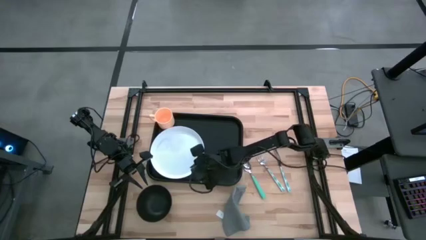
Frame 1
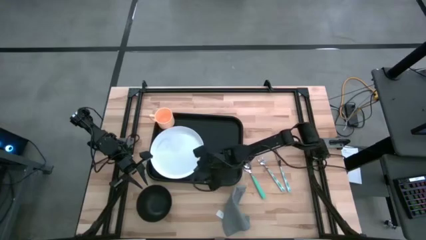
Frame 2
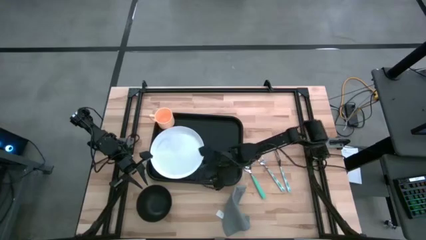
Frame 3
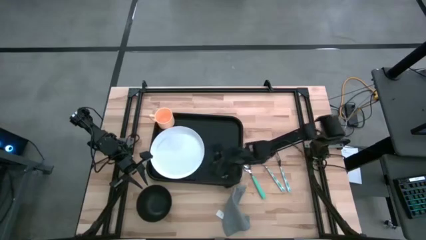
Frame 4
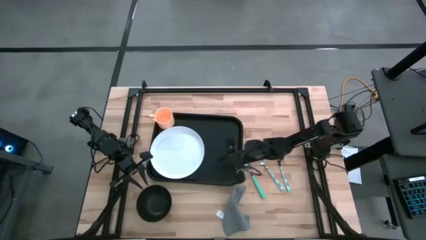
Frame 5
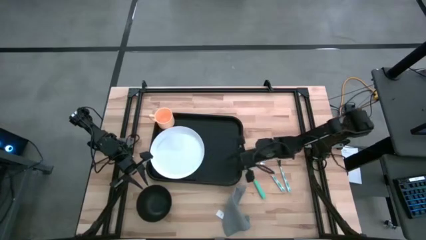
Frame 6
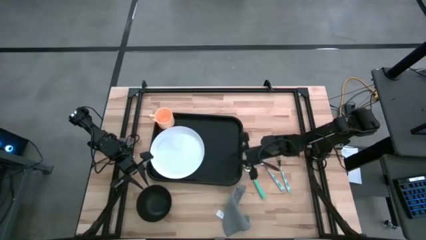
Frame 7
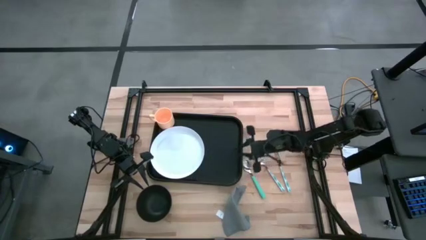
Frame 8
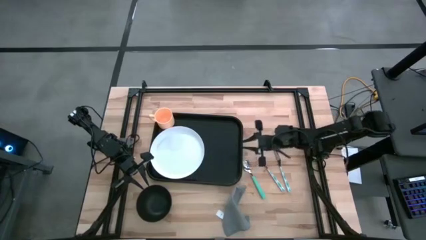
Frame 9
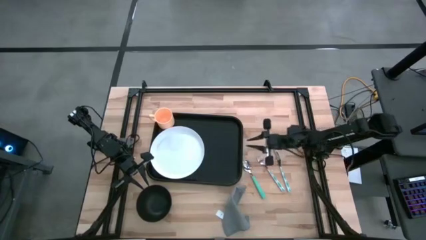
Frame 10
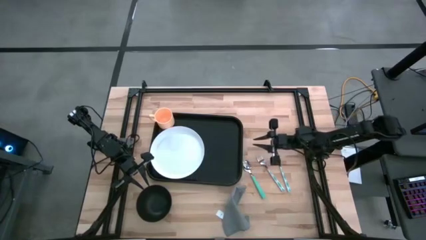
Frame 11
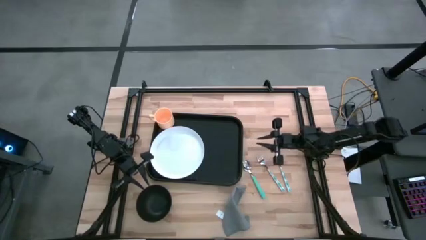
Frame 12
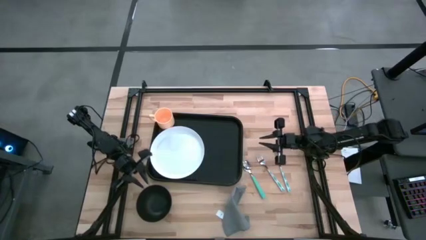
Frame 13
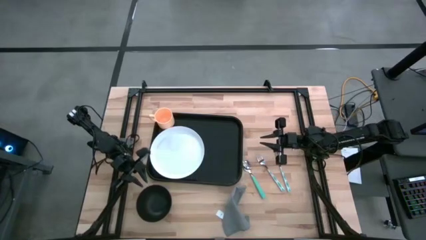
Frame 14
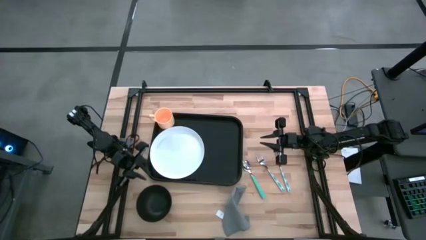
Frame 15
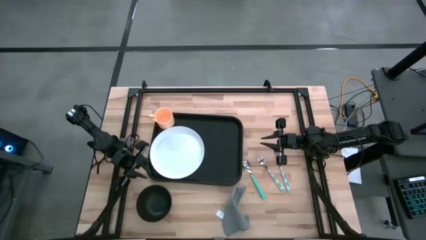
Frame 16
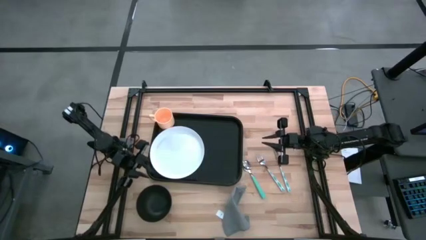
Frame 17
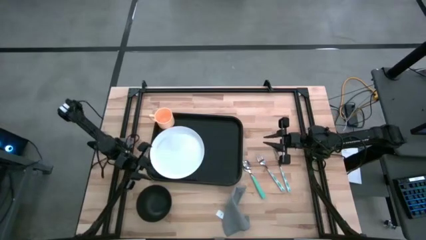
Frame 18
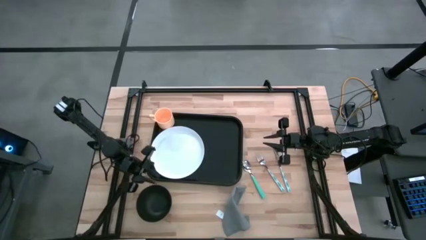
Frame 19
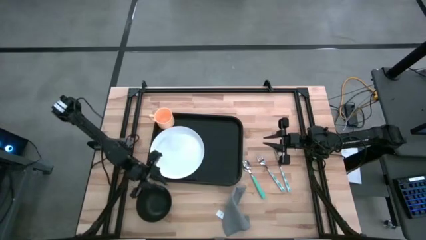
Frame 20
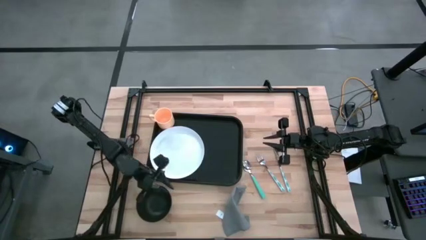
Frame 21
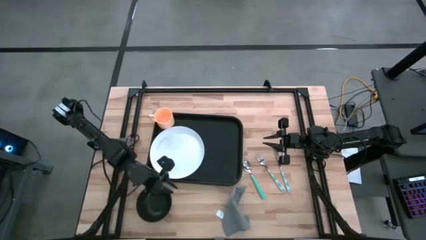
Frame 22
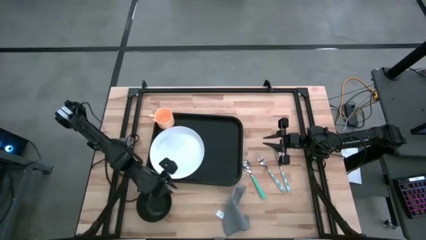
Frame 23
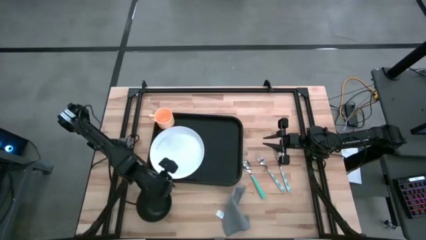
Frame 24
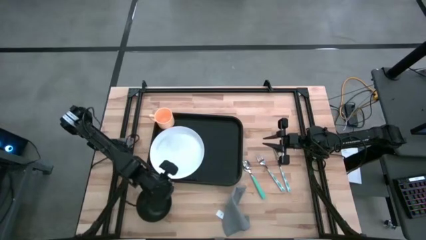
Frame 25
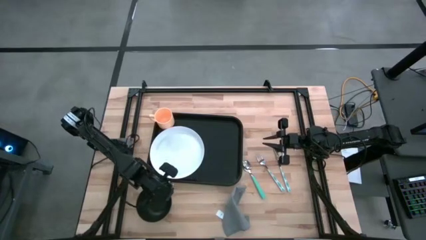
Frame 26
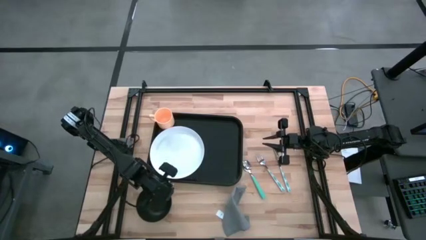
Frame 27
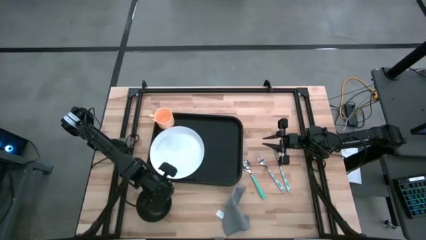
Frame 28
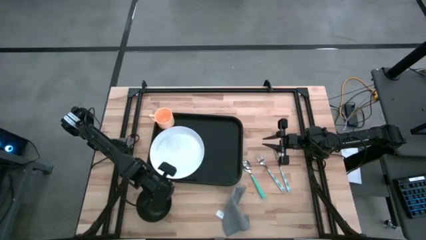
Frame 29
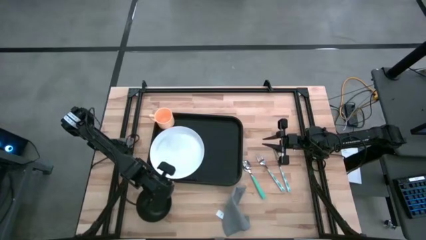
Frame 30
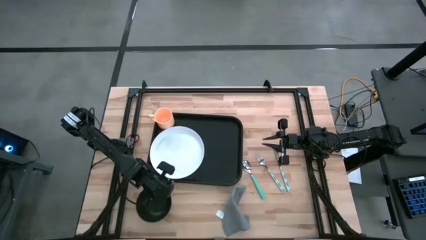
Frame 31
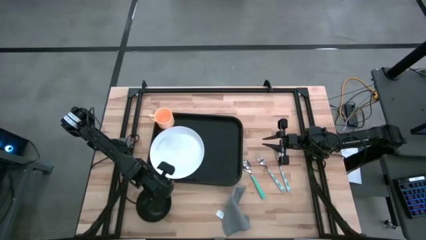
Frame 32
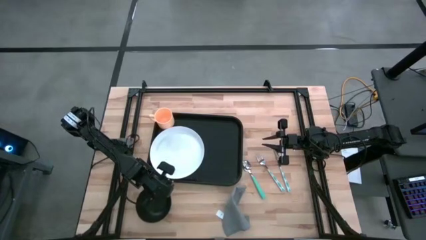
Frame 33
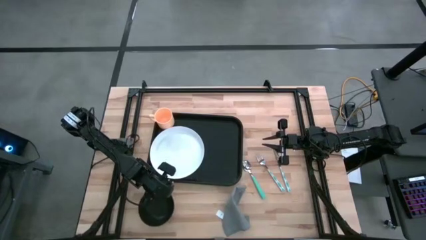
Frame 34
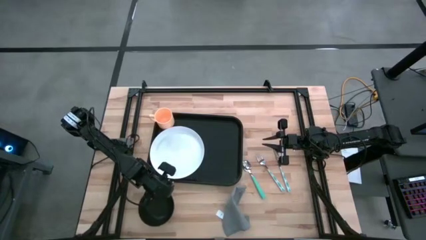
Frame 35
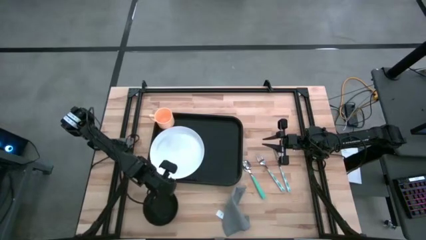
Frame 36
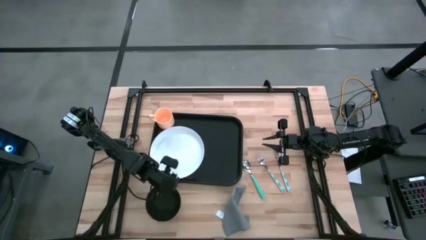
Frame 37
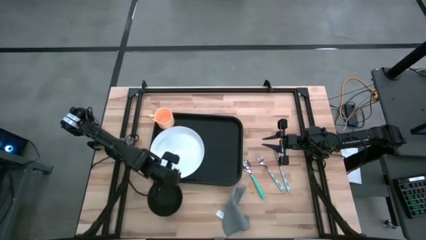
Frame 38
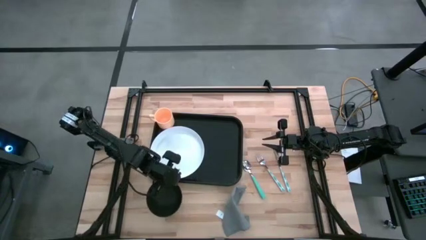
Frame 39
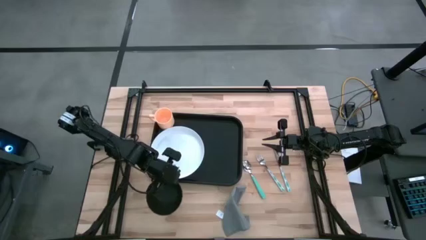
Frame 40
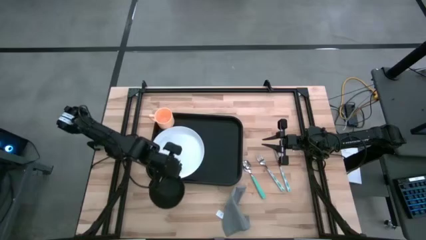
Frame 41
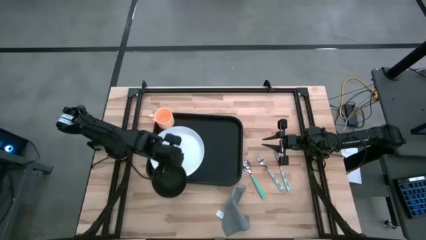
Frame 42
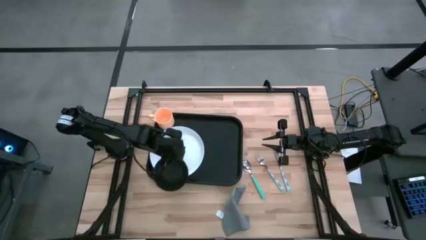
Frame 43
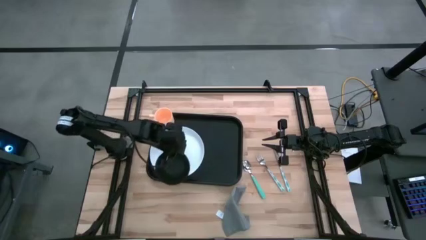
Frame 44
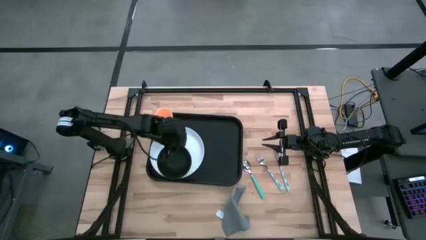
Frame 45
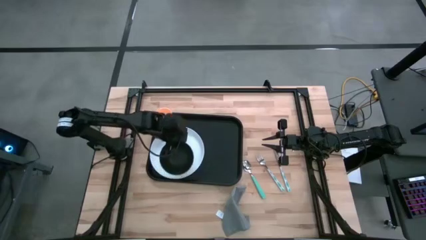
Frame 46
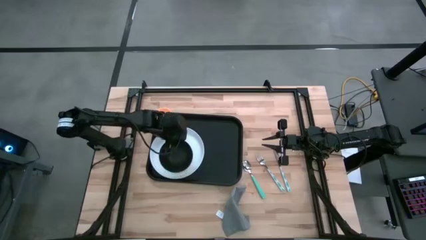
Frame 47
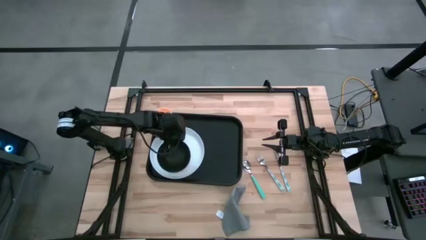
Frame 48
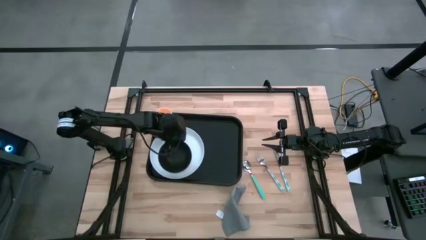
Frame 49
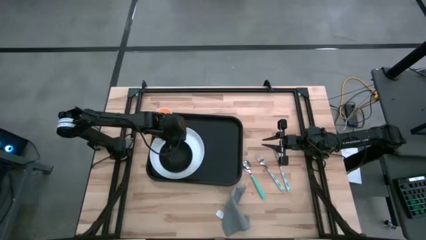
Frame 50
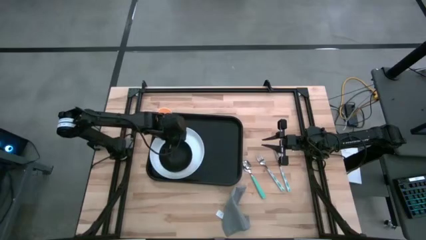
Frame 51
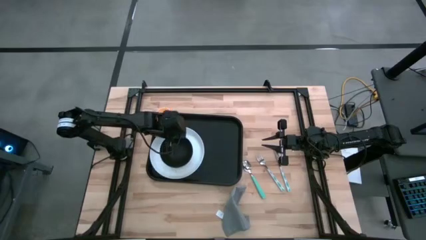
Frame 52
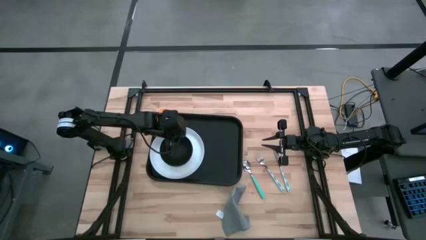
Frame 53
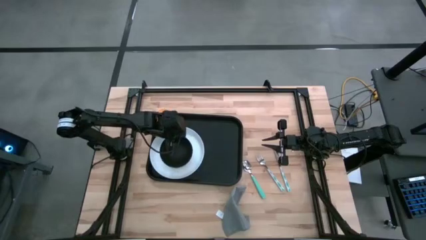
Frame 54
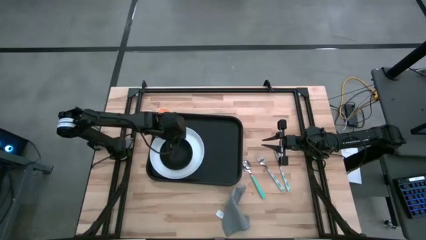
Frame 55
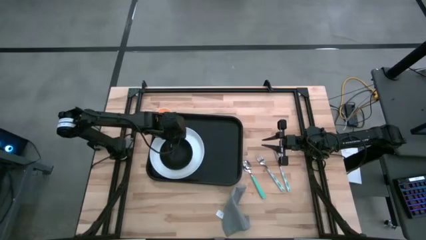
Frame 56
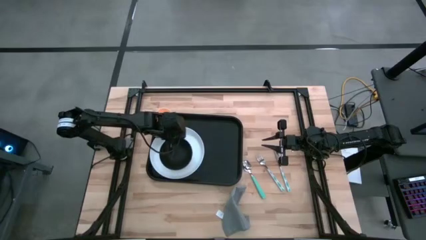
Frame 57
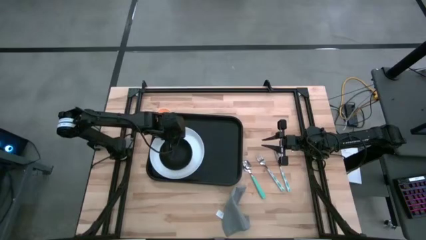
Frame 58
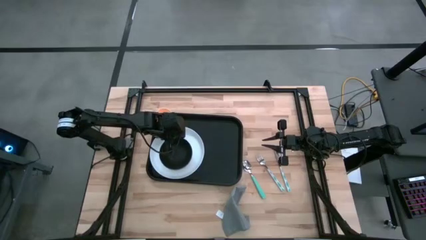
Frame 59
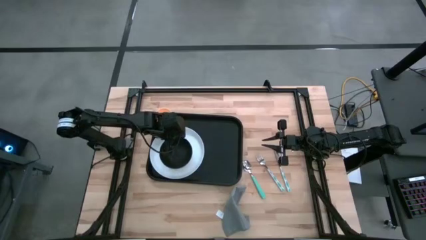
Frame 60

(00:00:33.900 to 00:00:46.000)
Task: Set up tray
Put the black bowl on top of the white plate
